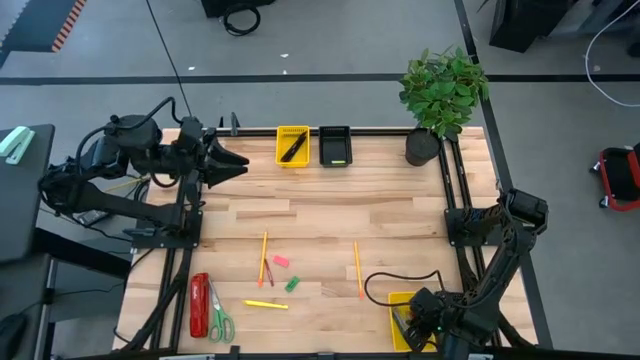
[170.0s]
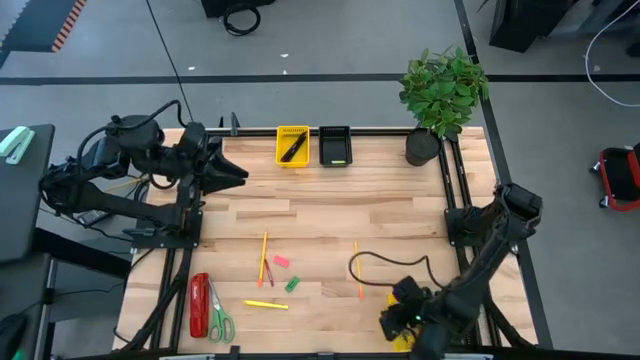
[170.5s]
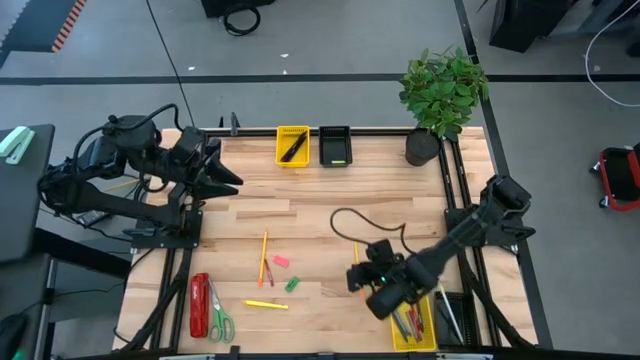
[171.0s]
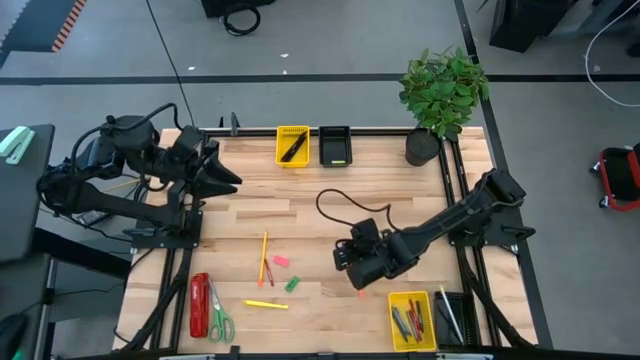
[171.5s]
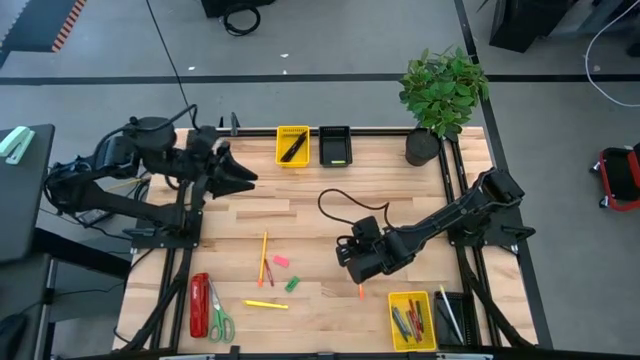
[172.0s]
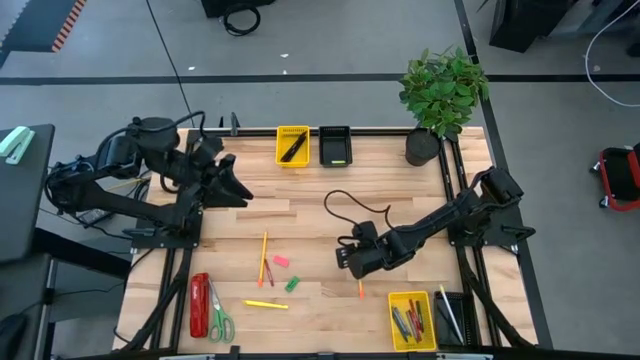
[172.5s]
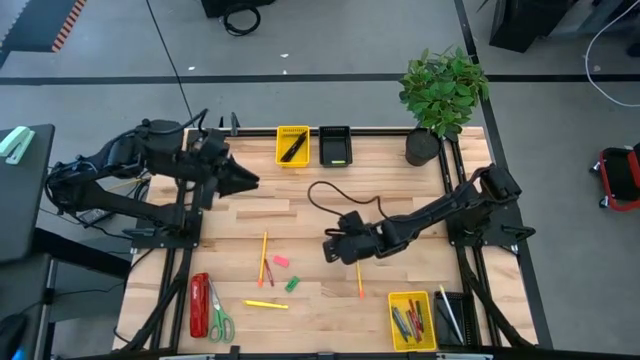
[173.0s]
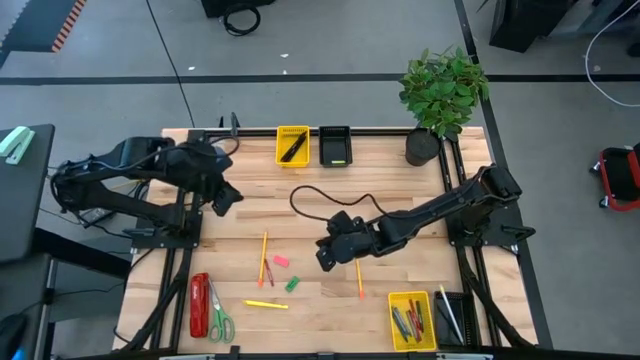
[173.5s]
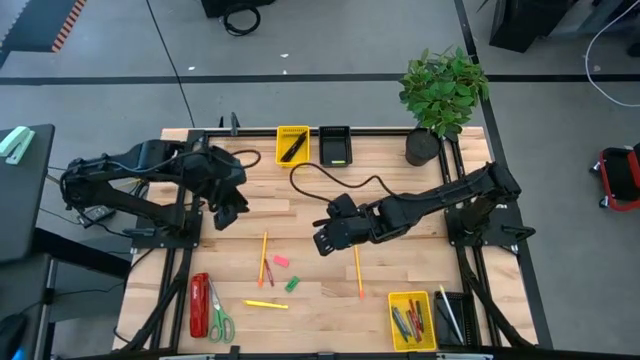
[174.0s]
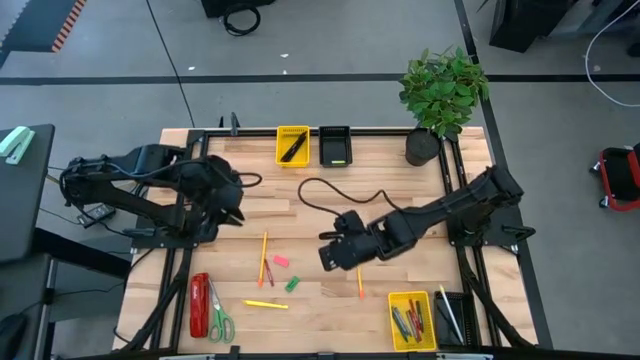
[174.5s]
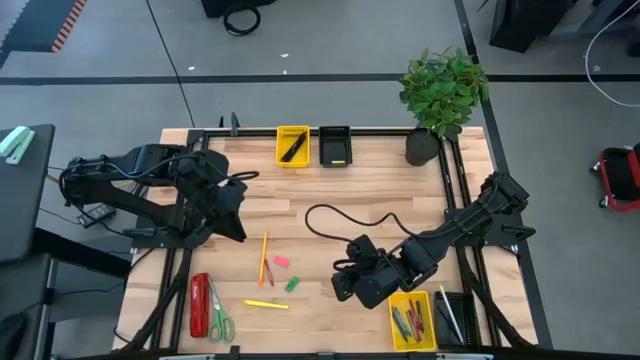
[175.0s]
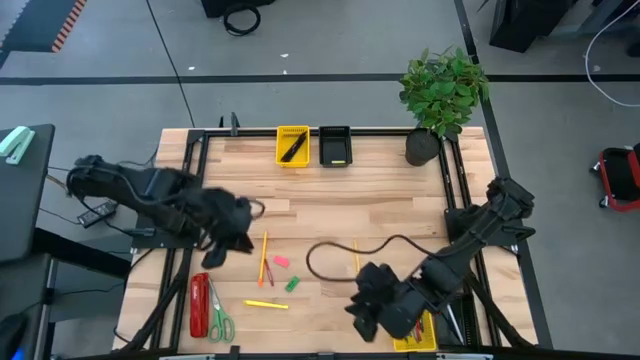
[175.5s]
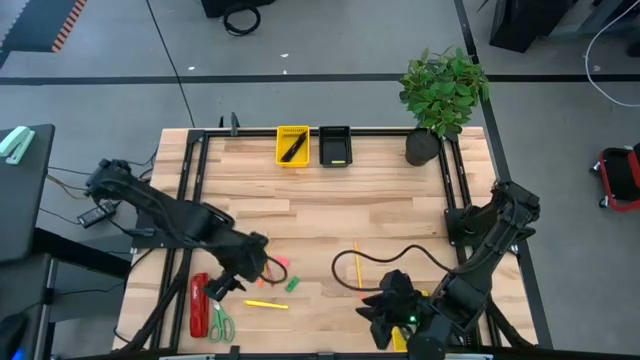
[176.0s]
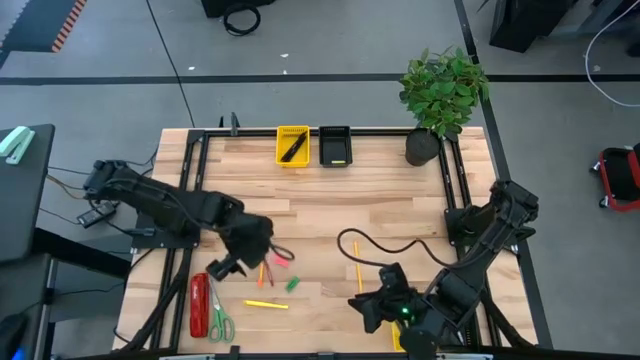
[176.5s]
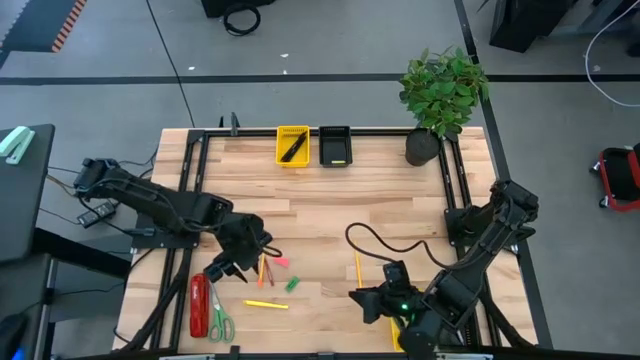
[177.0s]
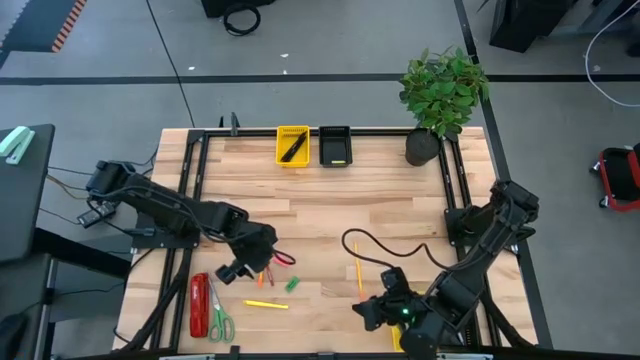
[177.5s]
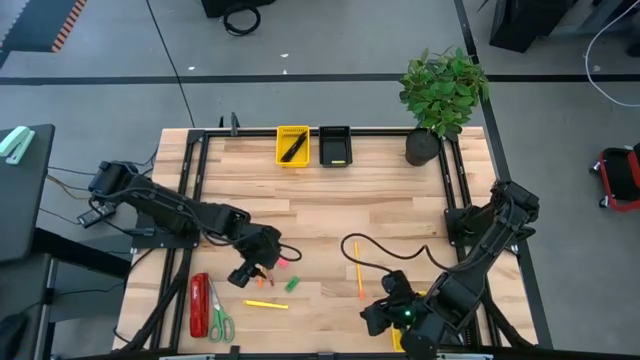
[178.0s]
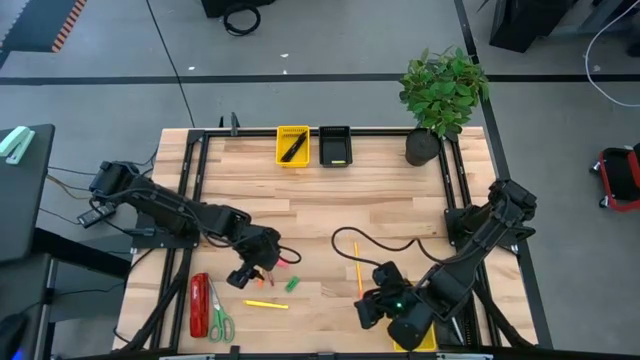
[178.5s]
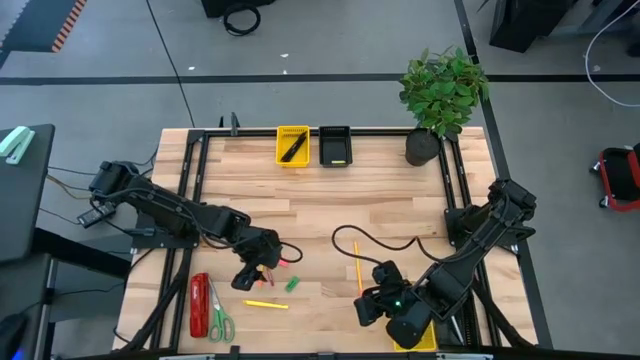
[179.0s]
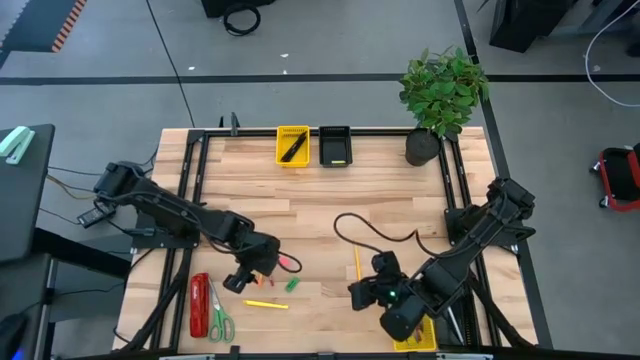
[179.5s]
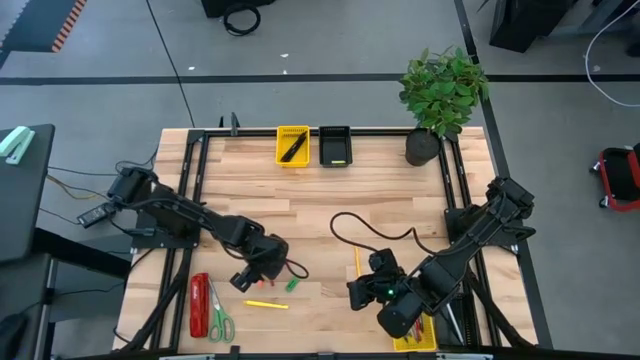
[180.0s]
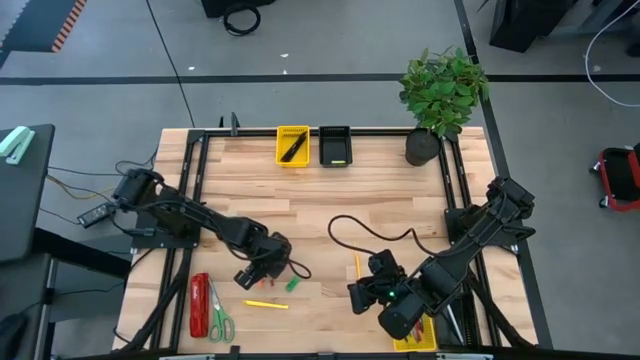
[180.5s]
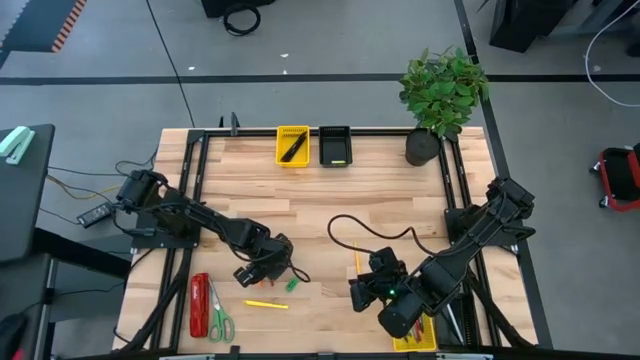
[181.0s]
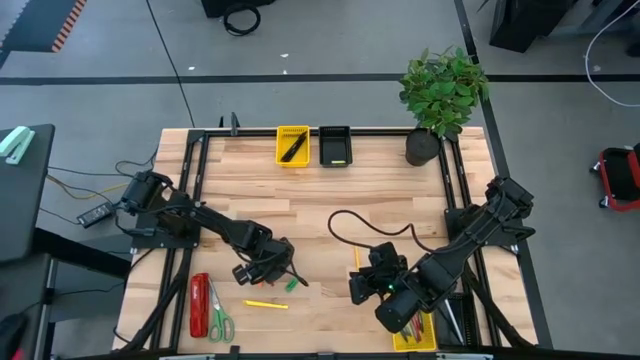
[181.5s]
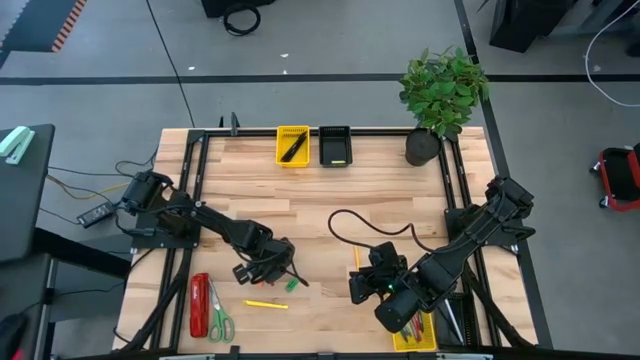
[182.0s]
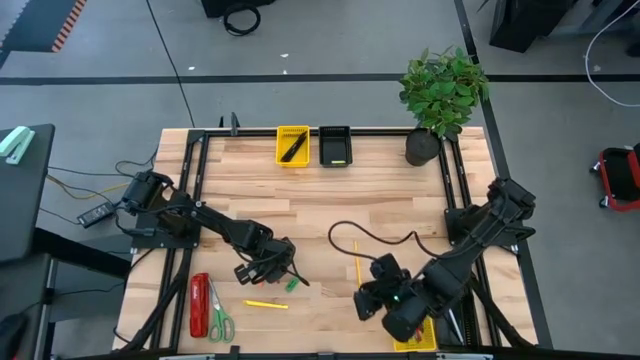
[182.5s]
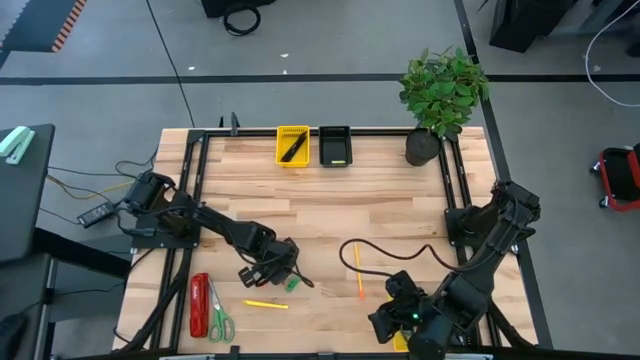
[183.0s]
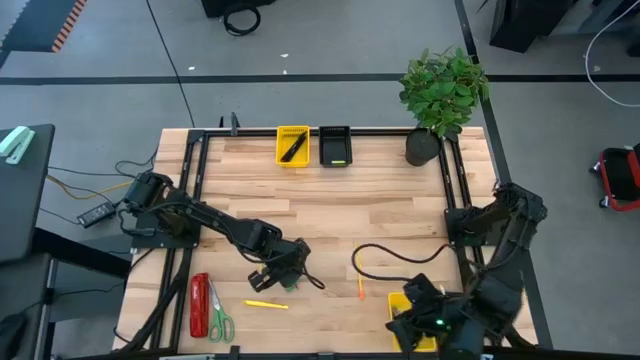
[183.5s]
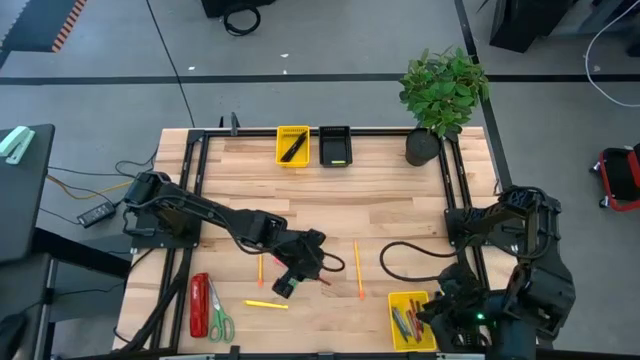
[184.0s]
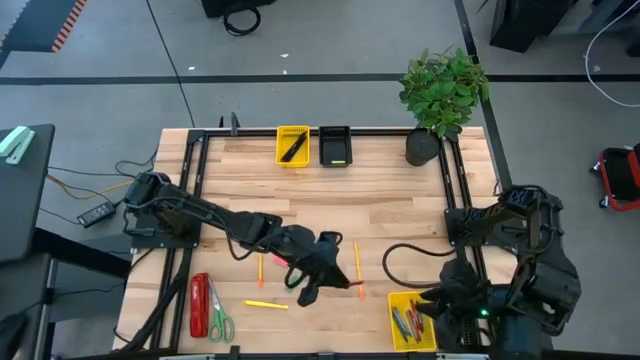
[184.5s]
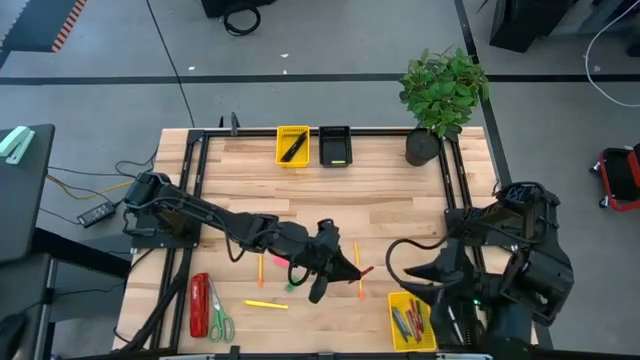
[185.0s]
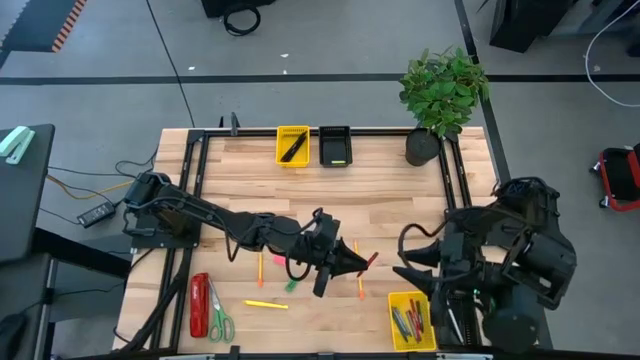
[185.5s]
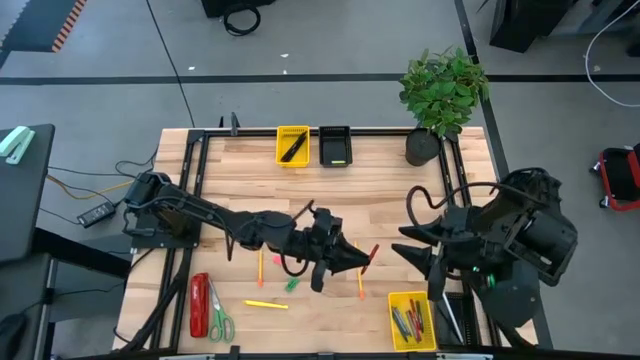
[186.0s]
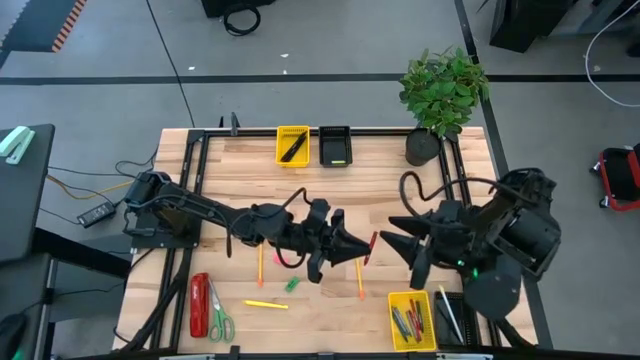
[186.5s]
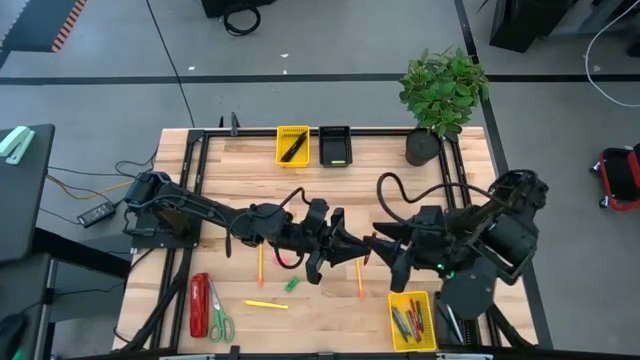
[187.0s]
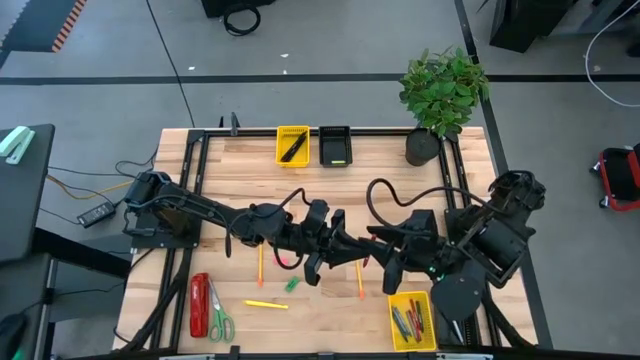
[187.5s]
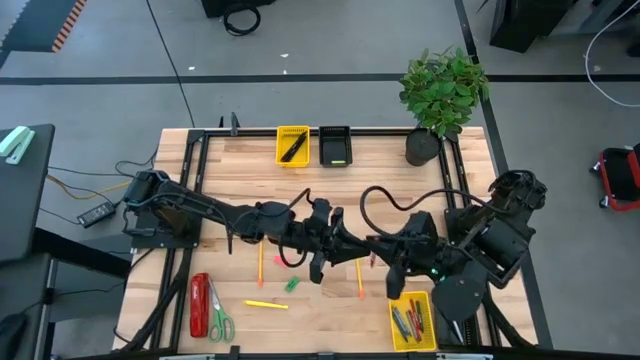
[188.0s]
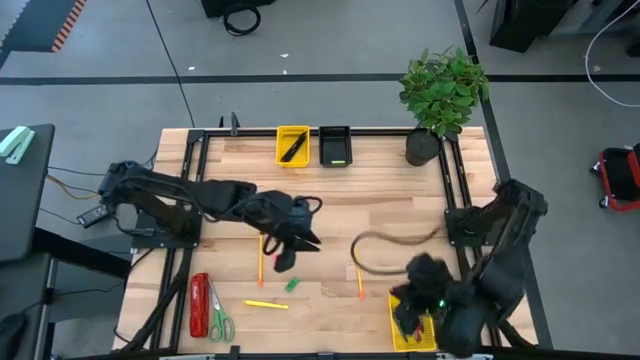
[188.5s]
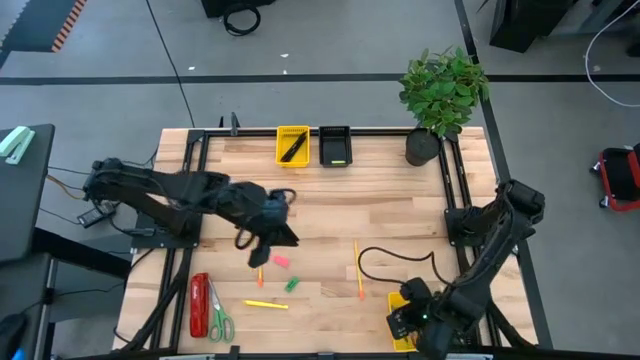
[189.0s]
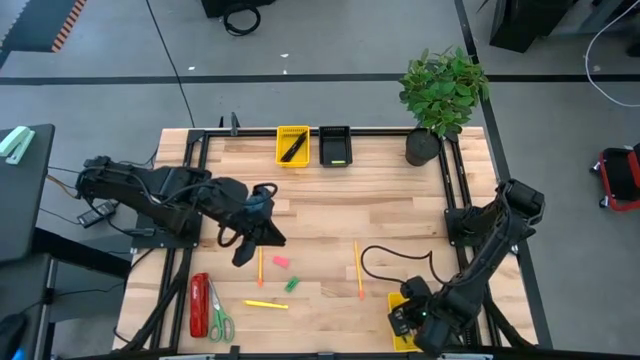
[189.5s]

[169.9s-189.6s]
Task: Sort crayons/erasers/pens/pencils in bins
Put the red crayon into the bottom yellow bin

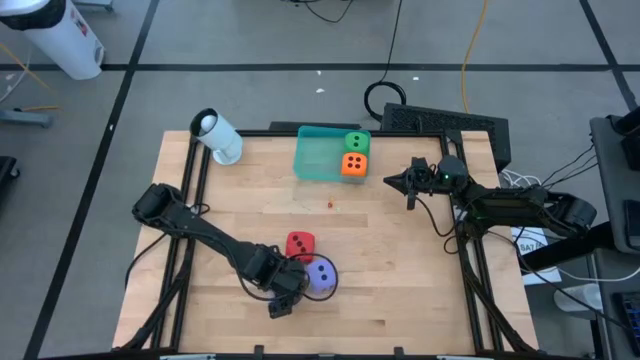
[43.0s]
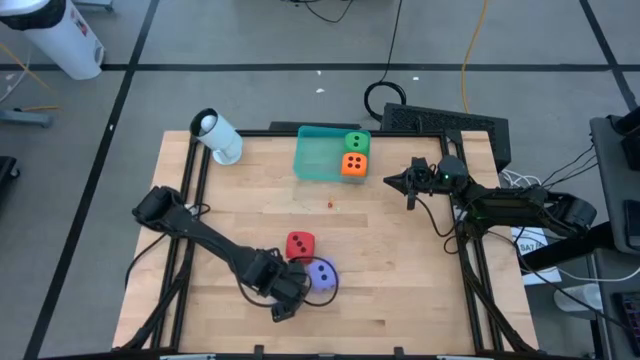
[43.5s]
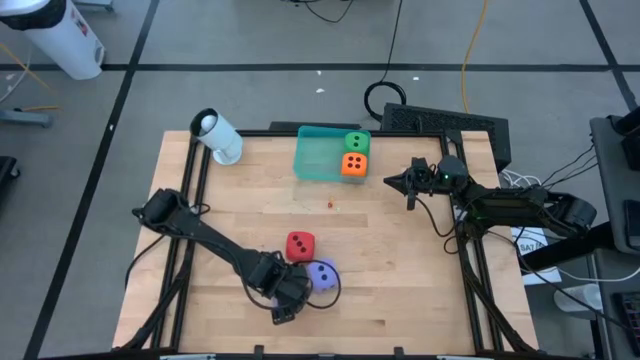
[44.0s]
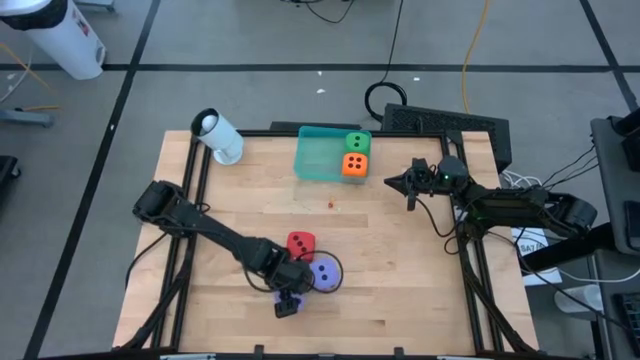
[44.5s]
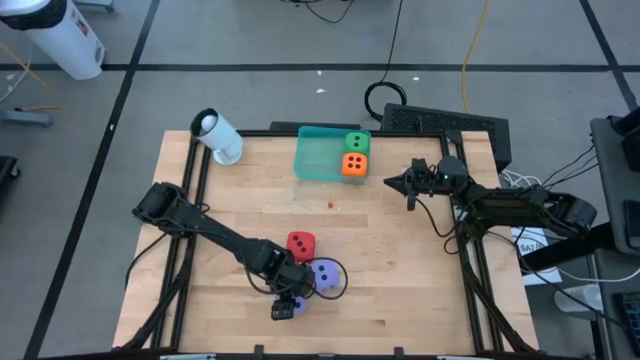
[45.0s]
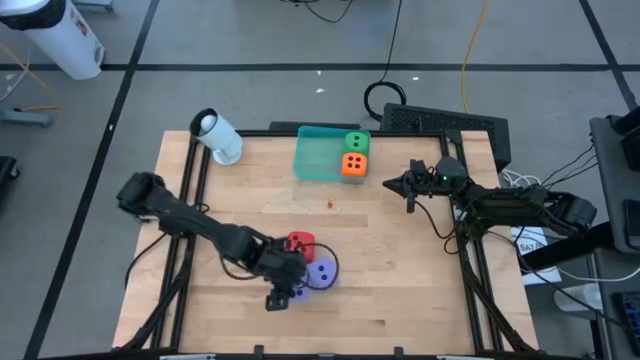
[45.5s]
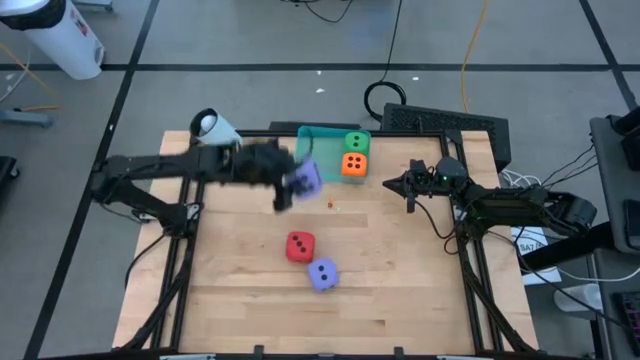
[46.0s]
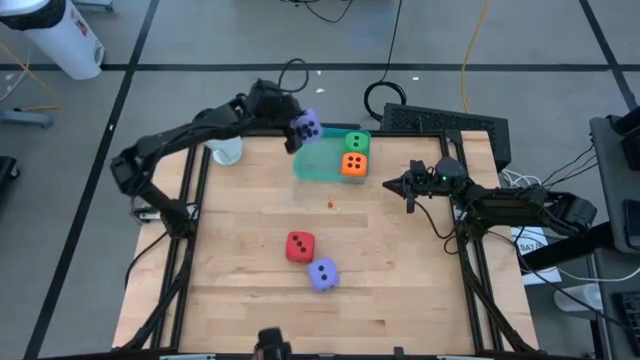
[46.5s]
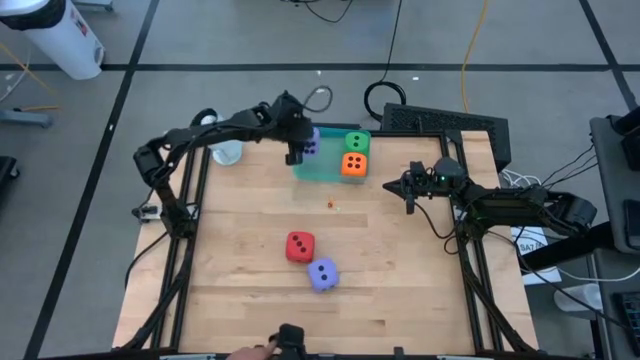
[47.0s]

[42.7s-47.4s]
Task: Pick & Place Dice
Put the large violet die into the blue bin
